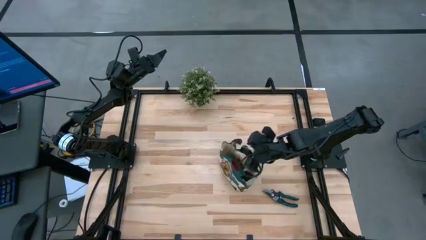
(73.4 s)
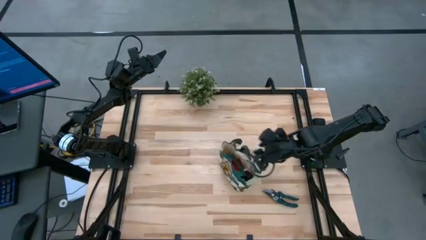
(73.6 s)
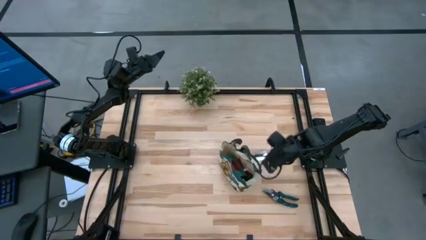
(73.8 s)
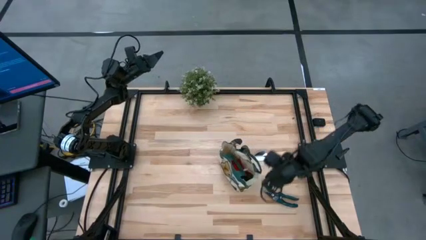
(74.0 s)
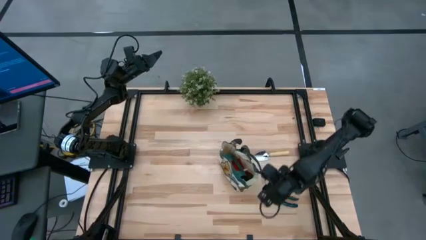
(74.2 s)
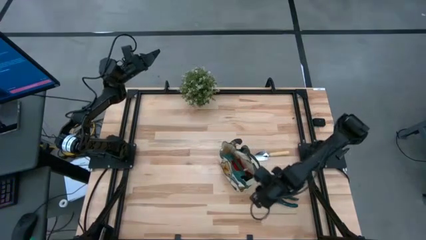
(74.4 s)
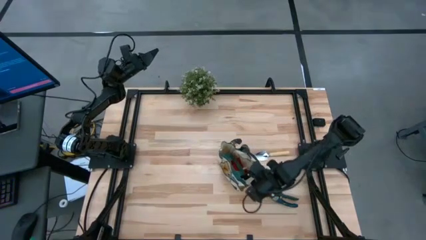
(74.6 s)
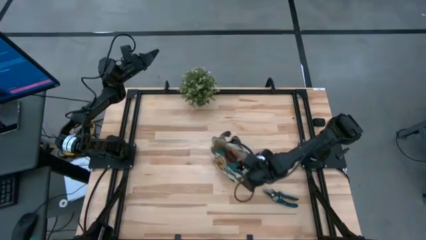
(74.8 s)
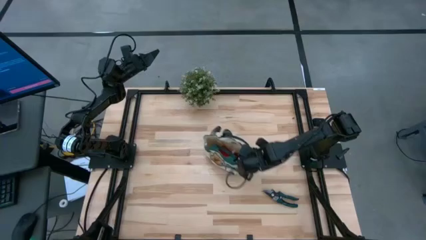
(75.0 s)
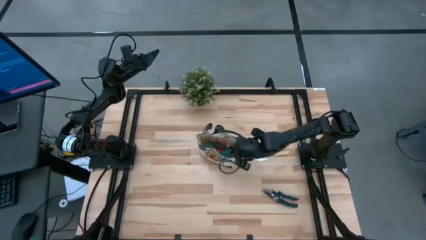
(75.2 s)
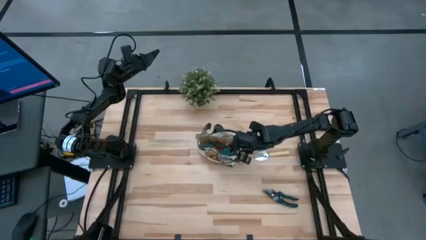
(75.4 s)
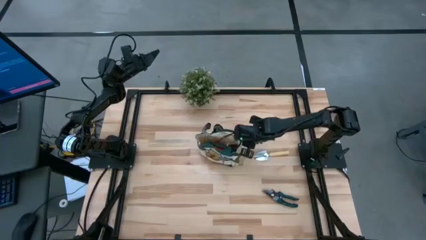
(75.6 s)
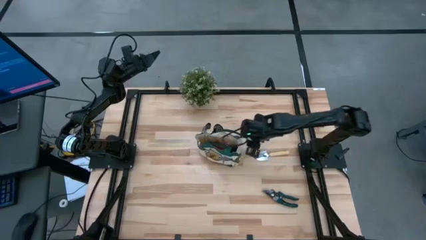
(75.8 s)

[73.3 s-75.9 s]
Task: Pick & Place Garden tools in Gardening bag
Move the white gardening bag to the center of the table

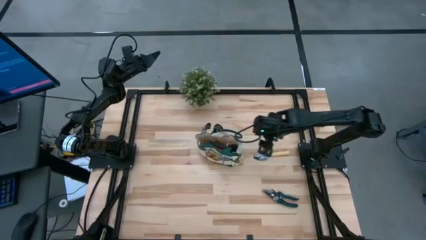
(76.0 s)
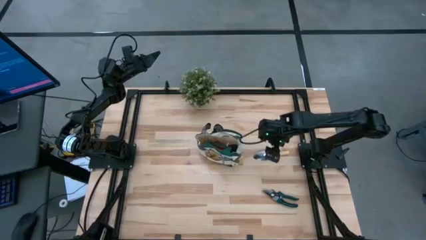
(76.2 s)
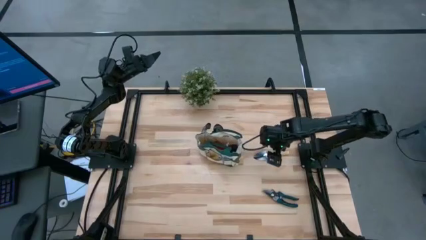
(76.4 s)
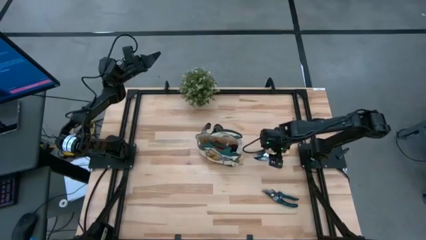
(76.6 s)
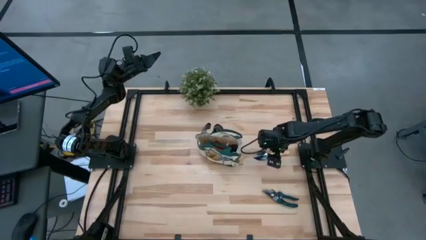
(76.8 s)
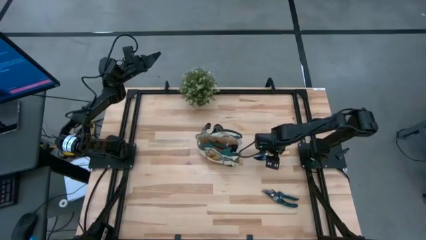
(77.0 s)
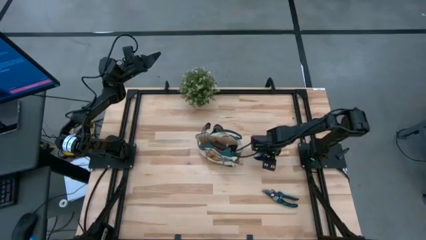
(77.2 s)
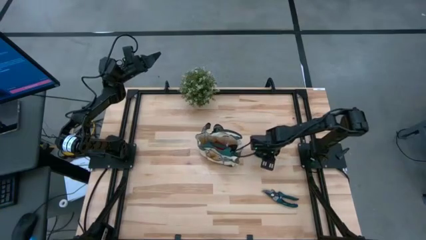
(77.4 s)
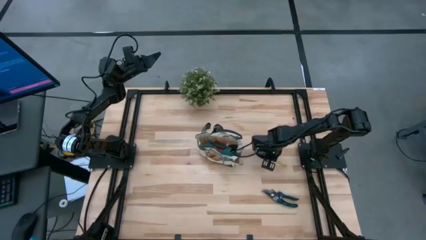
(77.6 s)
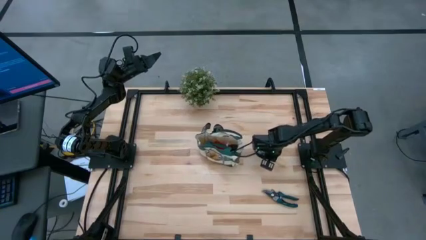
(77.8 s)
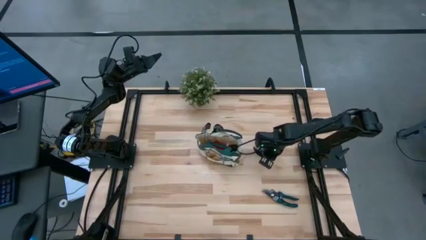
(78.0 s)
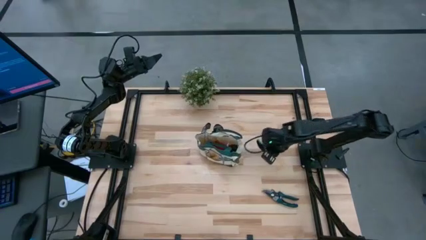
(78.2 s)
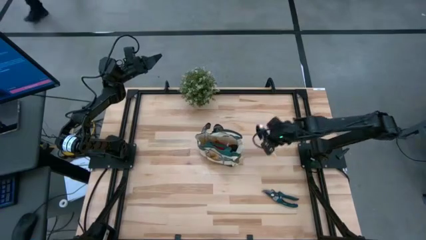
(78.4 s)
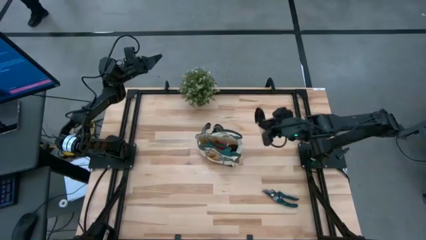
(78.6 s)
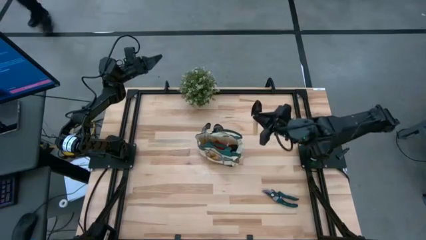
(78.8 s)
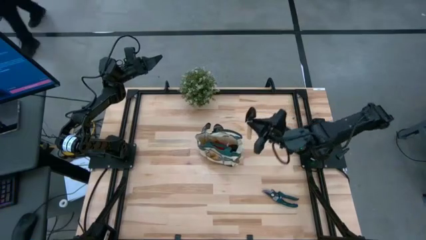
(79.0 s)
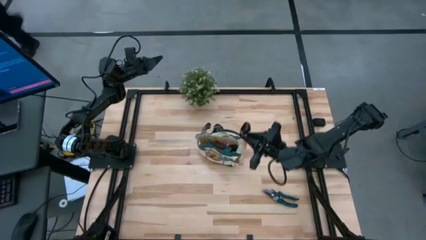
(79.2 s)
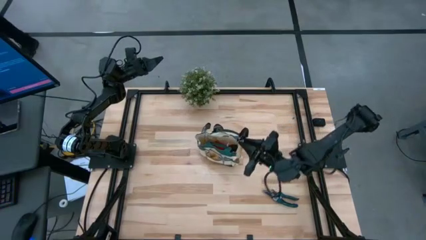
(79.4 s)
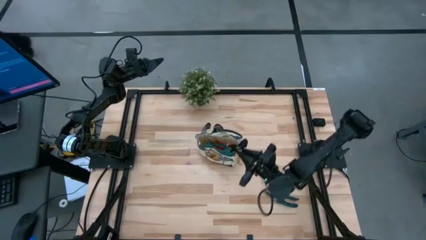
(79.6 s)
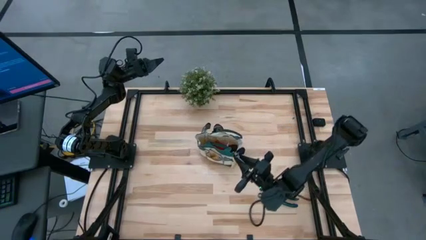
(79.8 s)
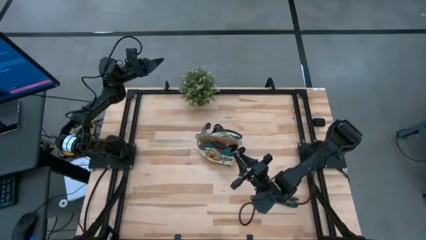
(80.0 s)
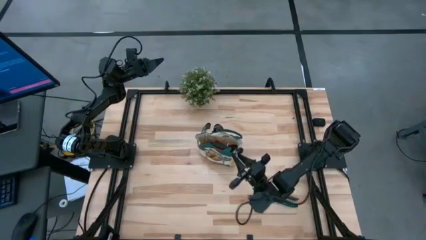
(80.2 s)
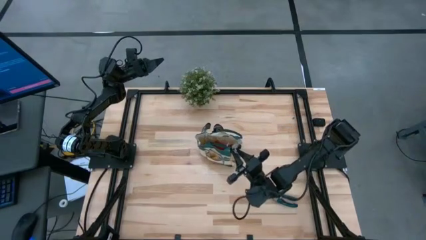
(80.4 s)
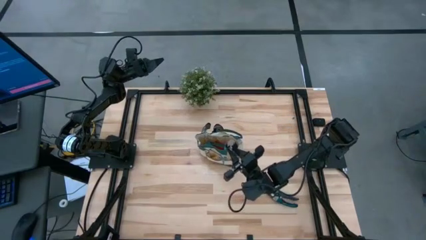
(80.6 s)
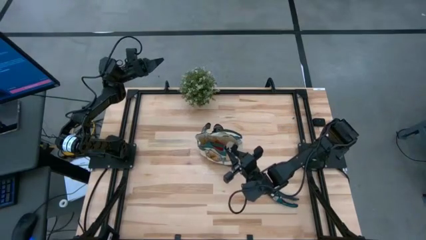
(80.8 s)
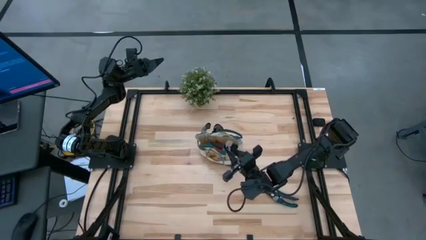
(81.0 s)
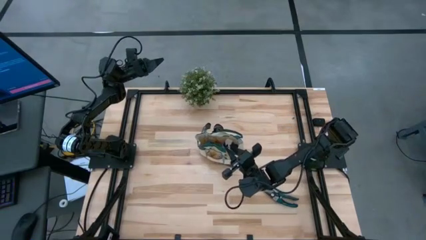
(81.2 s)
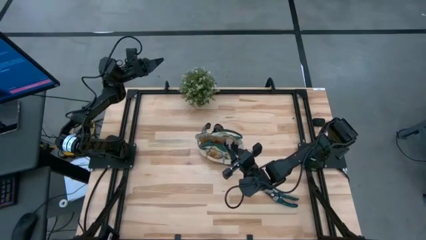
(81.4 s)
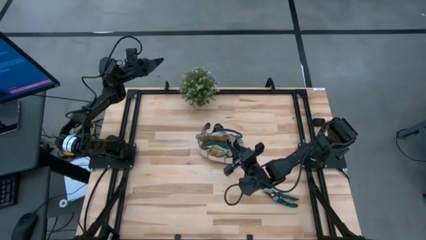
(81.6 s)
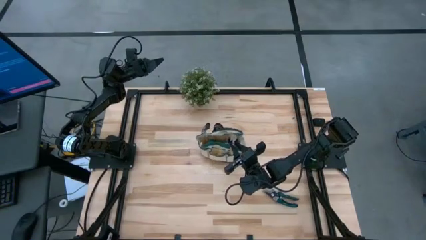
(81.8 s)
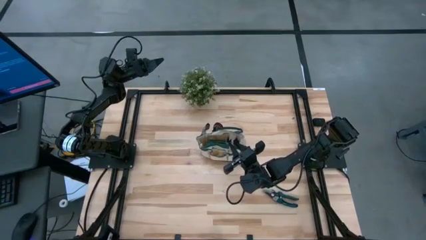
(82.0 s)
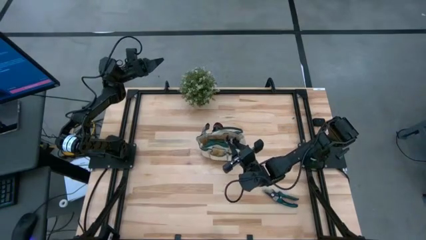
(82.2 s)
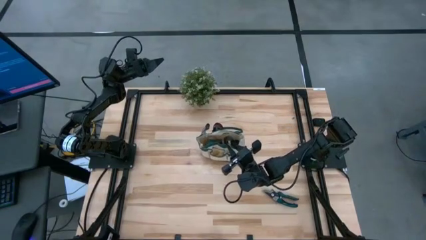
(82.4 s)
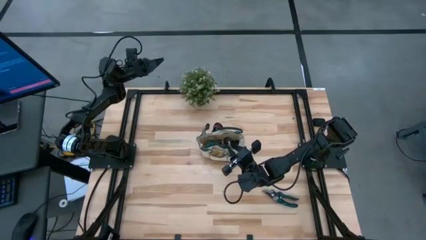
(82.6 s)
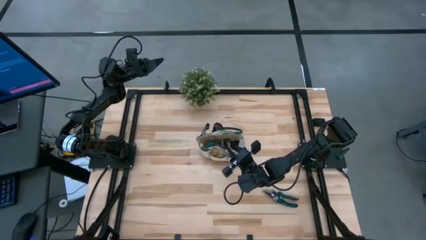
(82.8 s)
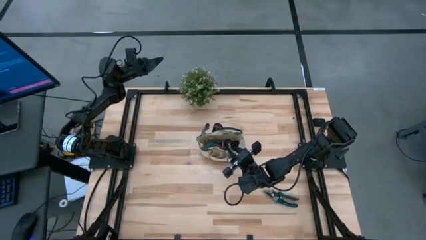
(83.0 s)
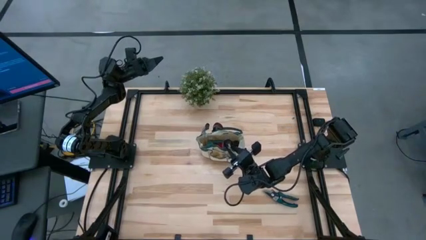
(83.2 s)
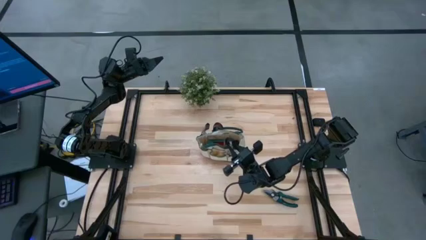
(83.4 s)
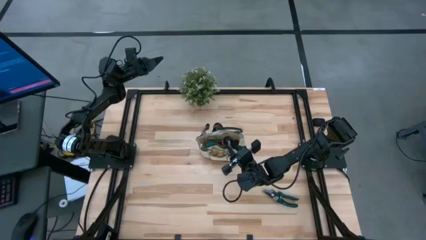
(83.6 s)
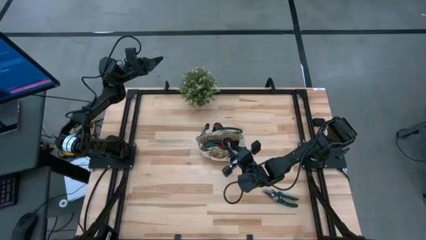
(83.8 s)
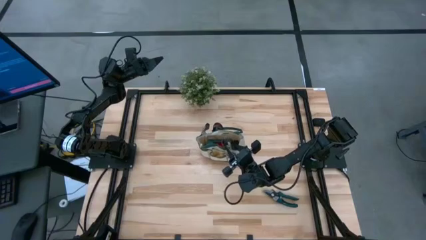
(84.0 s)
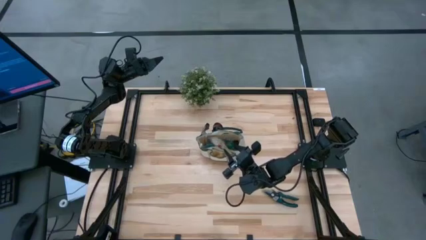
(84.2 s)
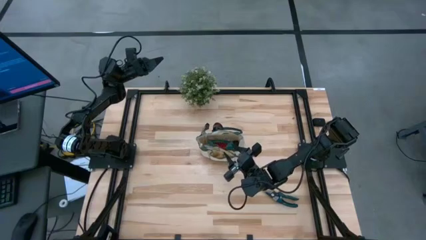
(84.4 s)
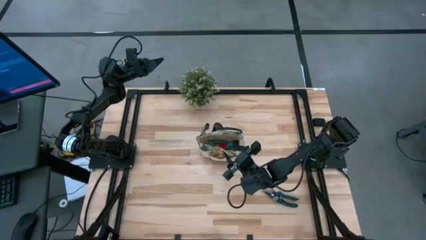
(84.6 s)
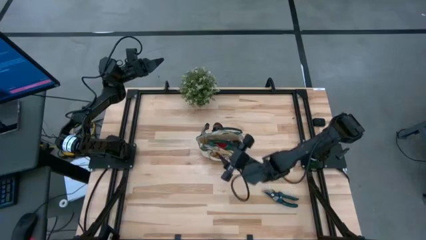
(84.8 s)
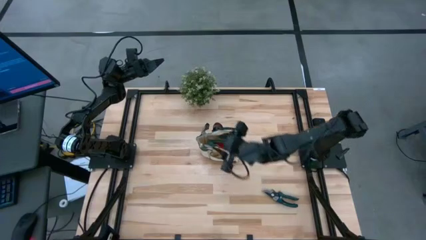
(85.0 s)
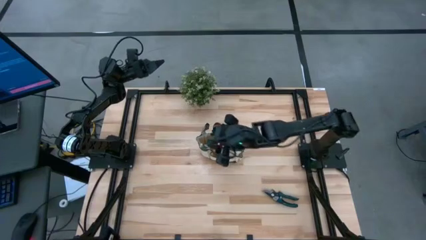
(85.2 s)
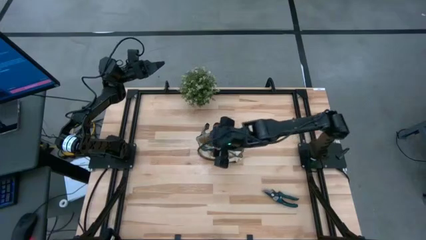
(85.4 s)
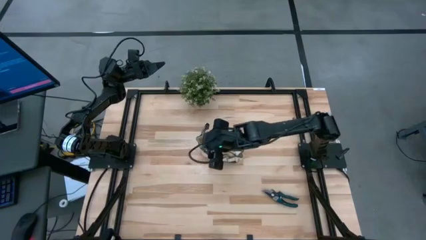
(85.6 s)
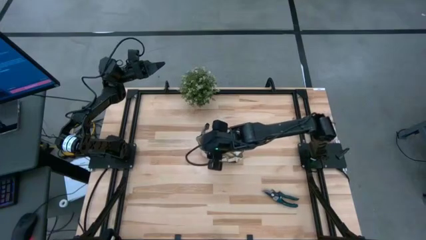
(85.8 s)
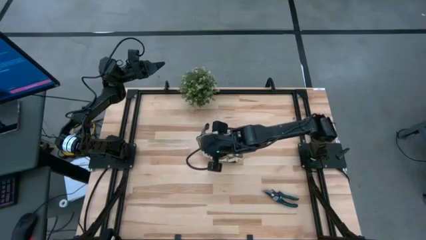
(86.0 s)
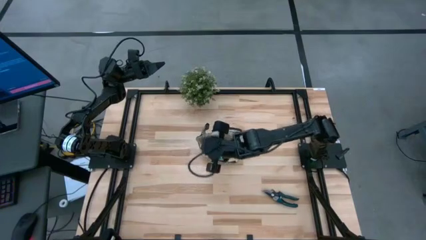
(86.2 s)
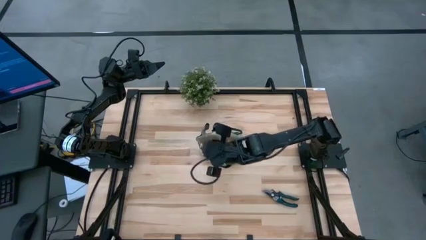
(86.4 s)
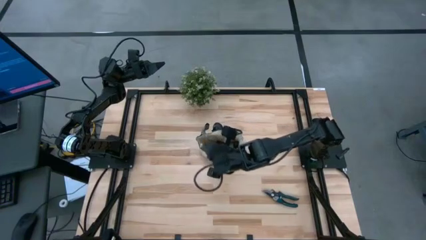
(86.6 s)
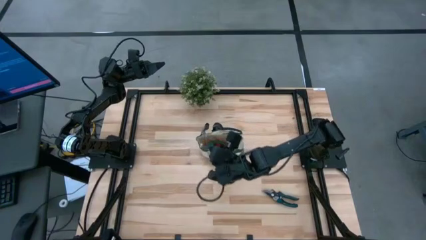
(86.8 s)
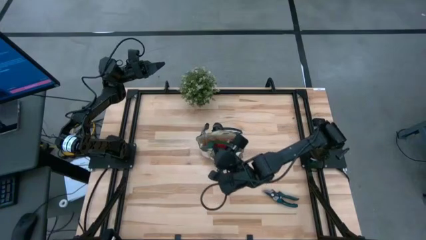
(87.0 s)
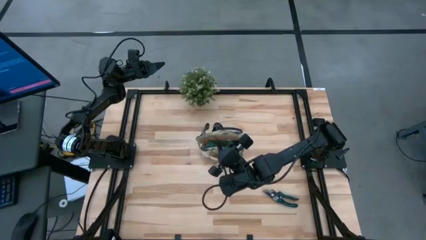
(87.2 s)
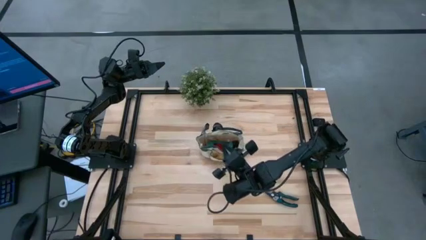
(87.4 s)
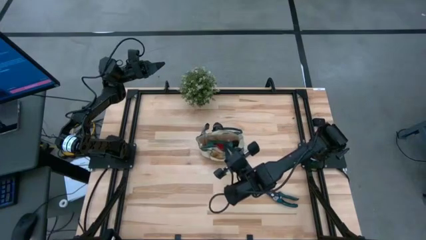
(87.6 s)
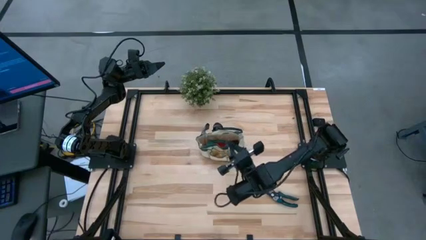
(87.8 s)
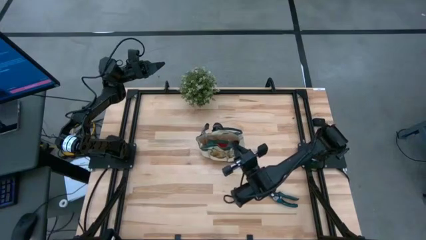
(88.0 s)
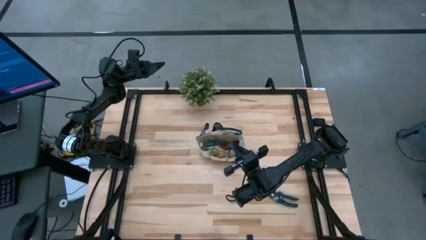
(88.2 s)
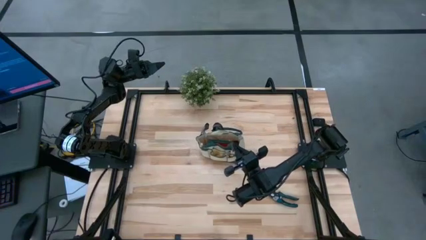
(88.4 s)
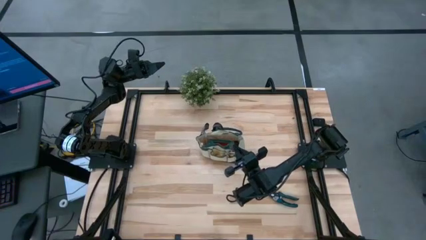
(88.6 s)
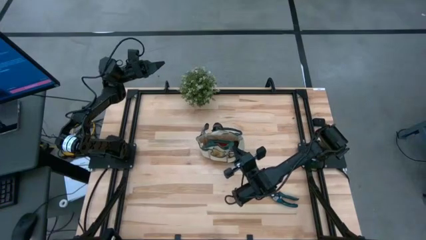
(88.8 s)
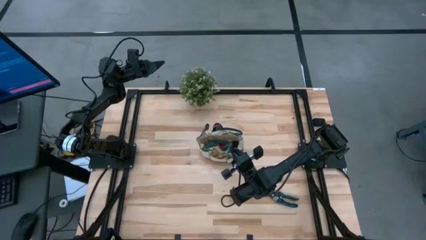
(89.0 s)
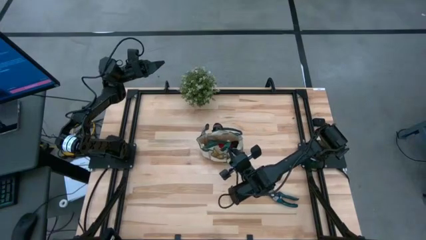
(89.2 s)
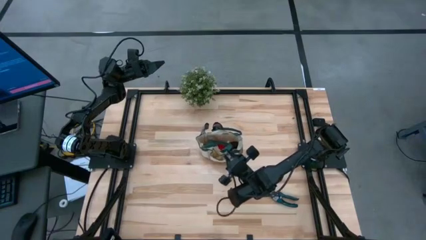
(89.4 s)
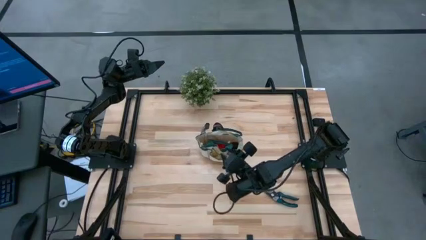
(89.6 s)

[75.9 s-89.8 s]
Put the brown trowel into the white gardening bag
